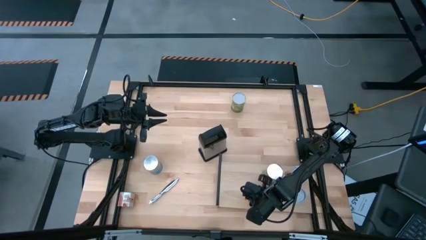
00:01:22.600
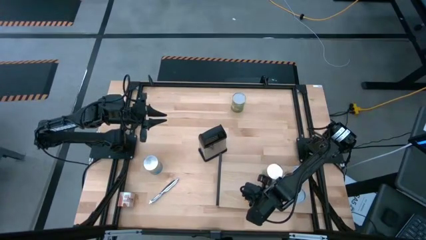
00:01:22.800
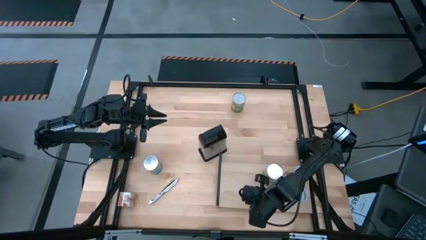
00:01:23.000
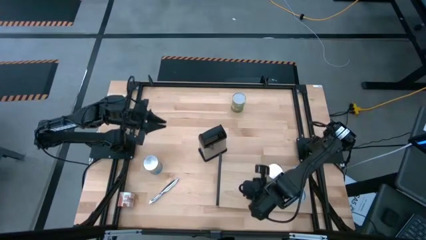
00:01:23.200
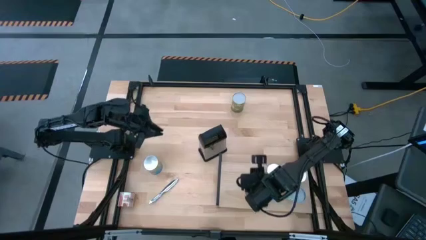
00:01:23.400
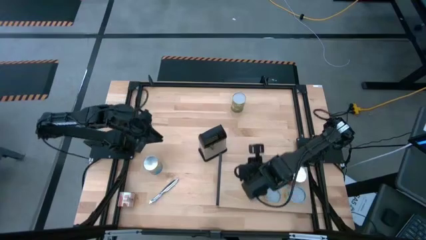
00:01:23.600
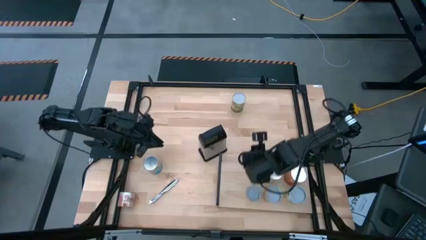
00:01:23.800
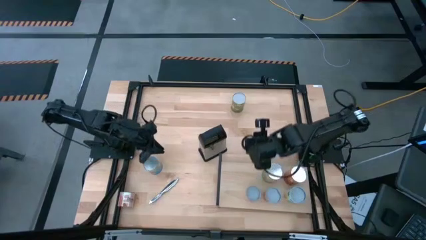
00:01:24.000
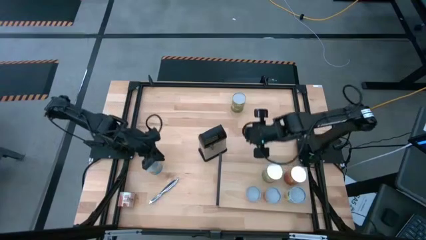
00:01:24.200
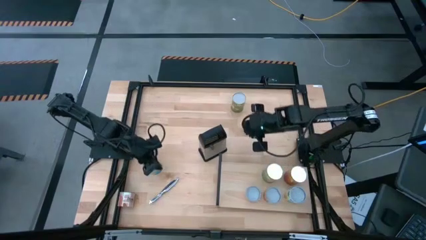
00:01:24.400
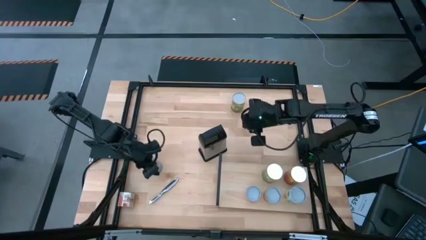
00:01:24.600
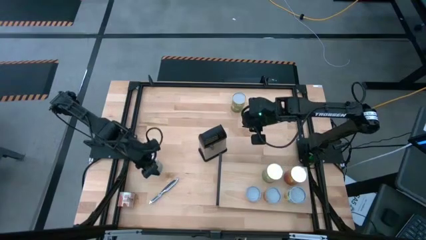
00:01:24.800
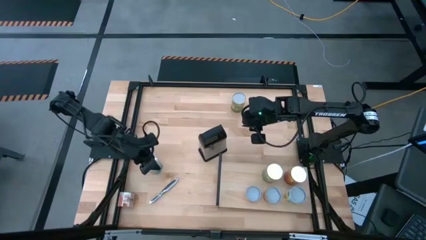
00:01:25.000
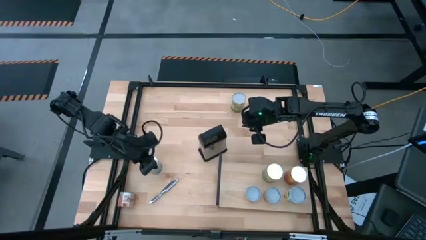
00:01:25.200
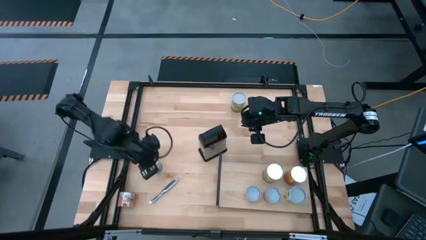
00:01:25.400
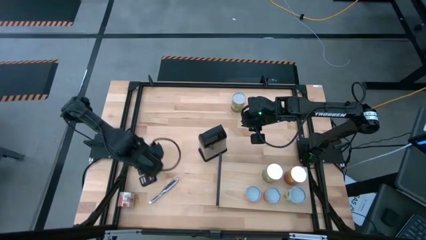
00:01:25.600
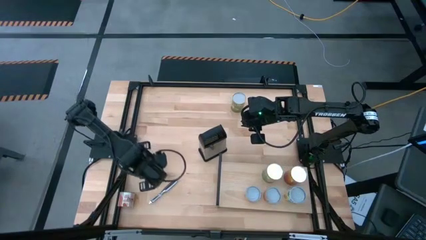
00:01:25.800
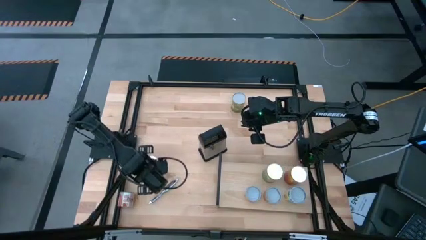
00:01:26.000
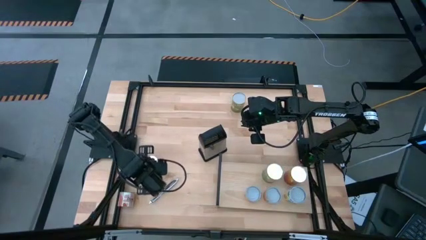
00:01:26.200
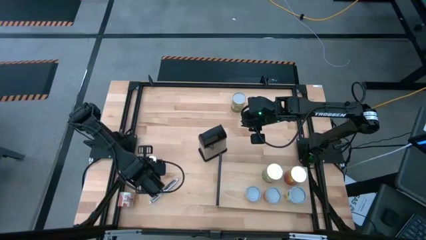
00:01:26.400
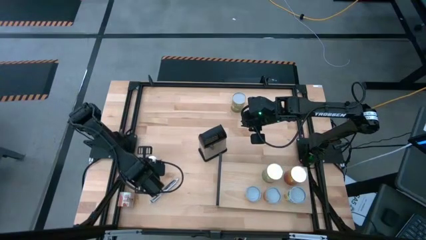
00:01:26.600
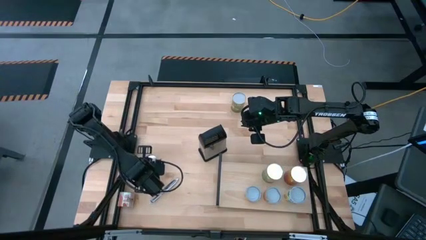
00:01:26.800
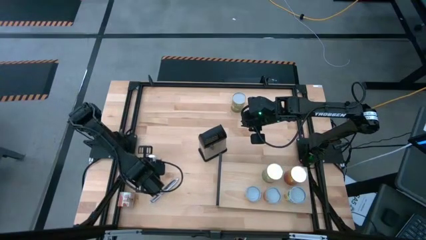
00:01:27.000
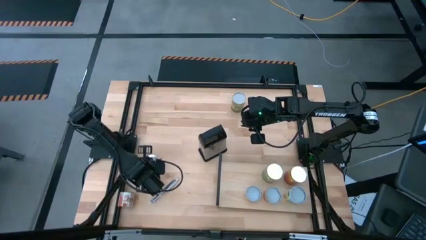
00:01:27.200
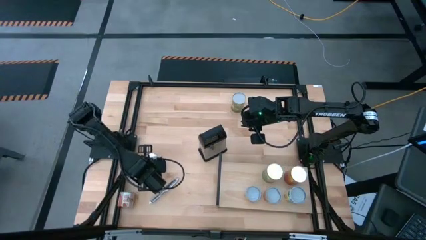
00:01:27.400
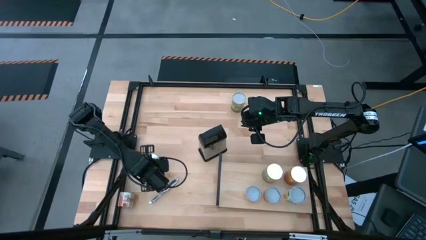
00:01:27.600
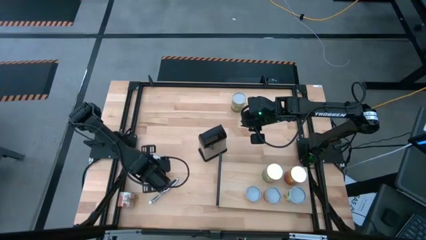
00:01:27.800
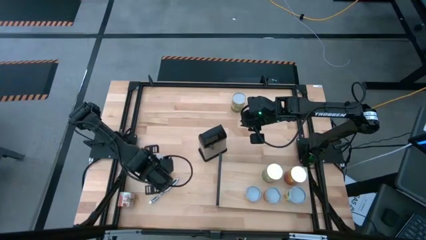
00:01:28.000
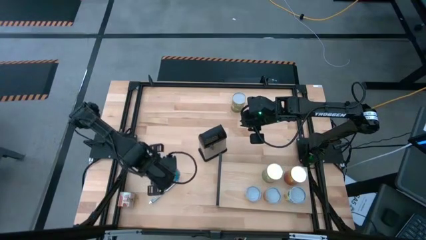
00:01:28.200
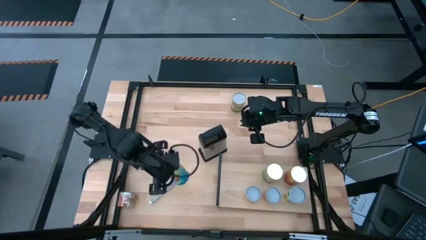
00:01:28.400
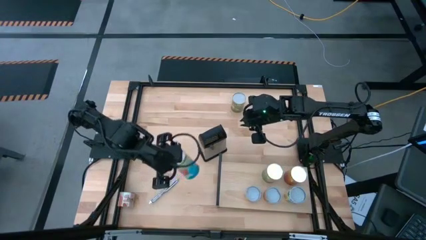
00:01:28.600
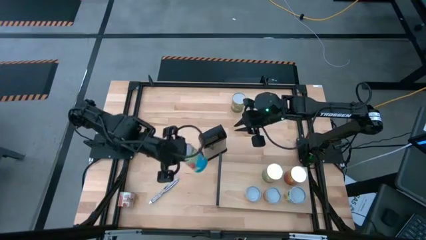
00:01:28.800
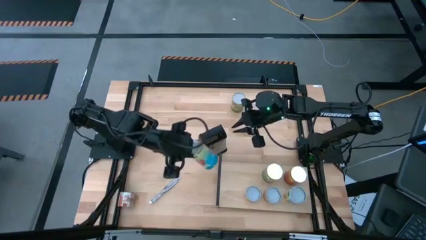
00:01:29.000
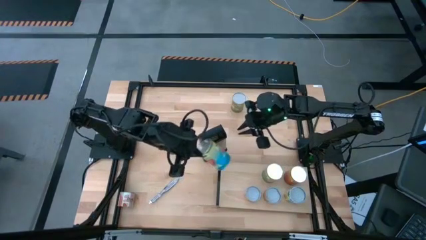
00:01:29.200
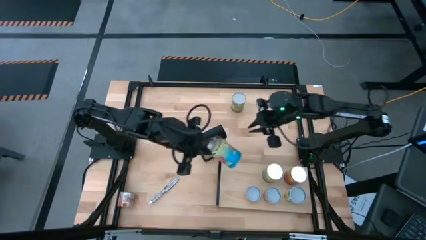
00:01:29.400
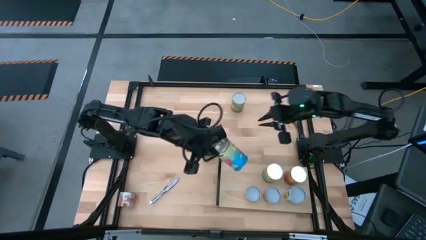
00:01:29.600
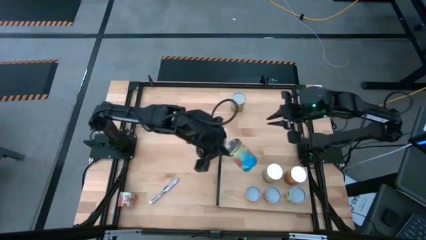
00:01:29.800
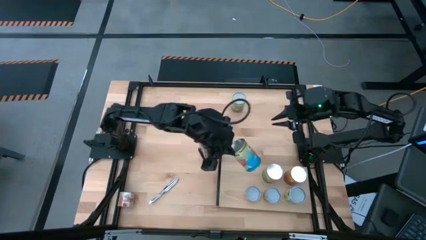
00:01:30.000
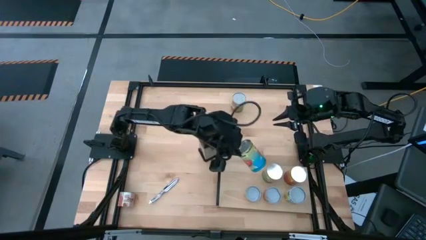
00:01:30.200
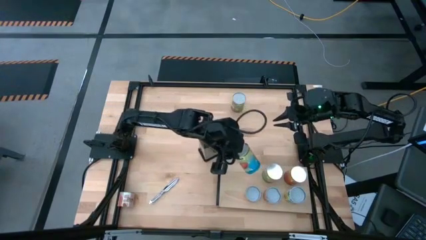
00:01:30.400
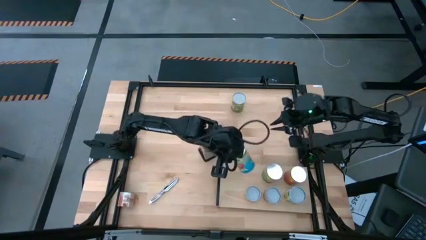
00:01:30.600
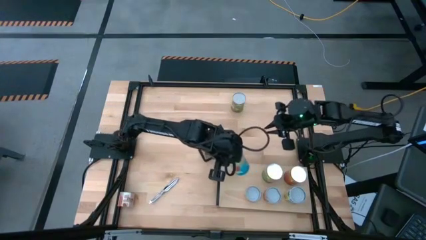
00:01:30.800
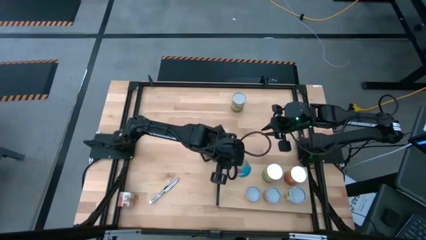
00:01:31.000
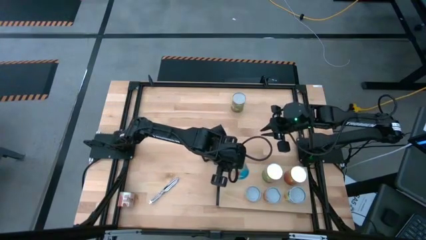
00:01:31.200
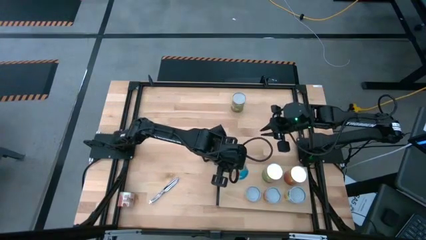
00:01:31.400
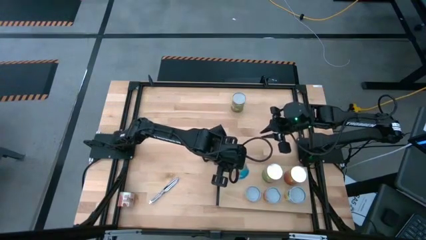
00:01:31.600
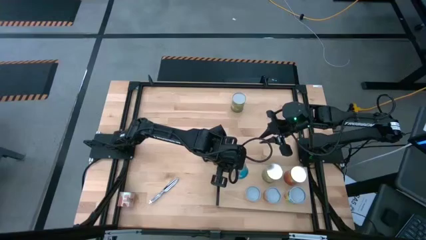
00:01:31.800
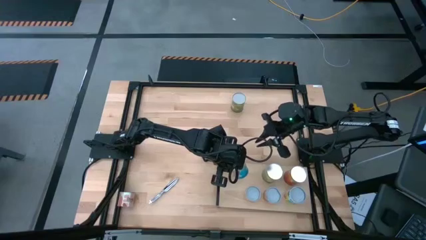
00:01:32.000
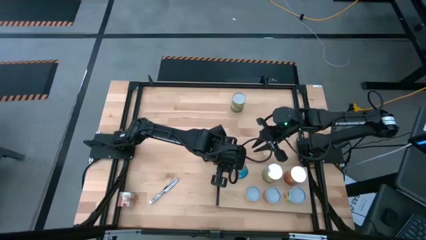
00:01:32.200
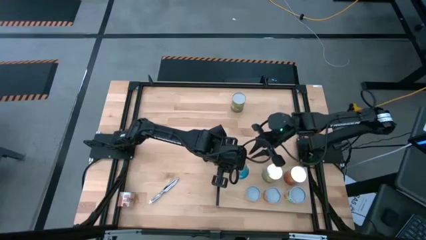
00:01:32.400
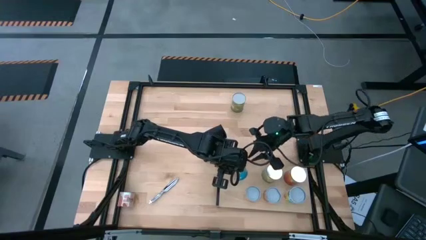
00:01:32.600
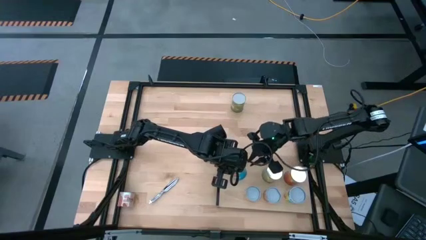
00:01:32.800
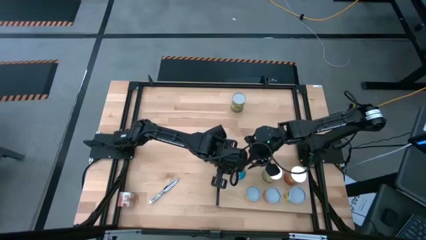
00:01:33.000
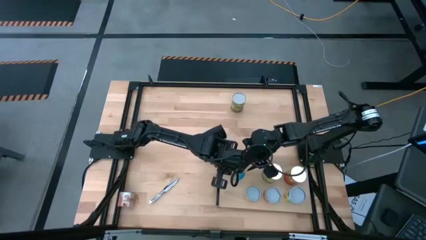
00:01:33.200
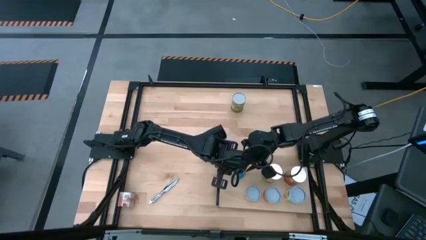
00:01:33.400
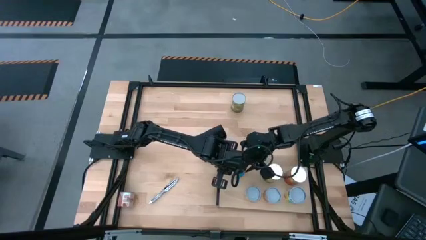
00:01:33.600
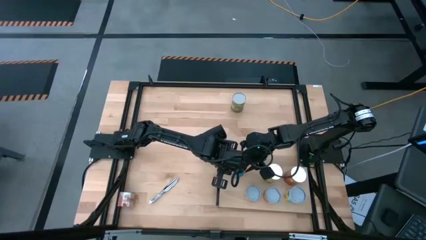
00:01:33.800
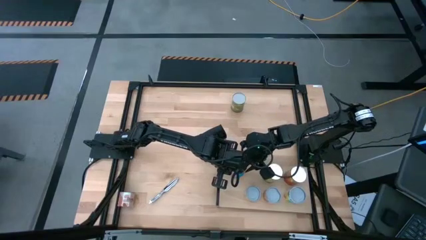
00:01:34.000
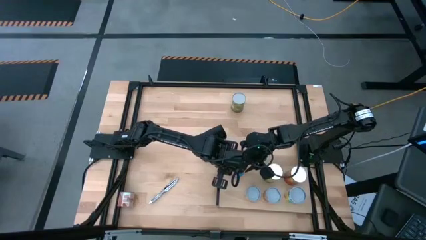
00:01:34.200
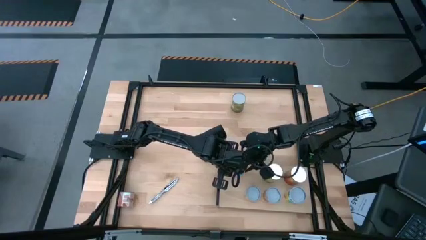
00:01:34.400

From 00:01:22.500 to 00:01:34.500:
Task: Pick and place cans onto a shelf
Put the canned tomatoes on the shelf

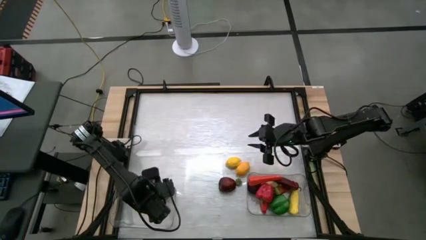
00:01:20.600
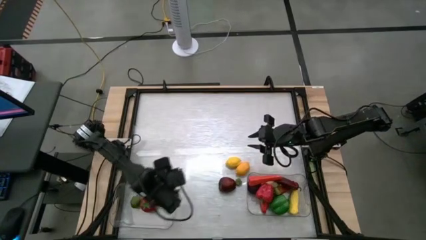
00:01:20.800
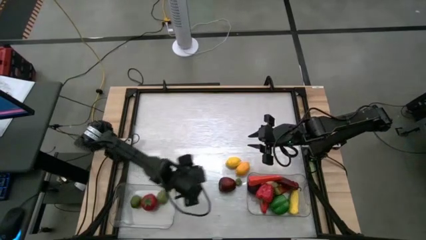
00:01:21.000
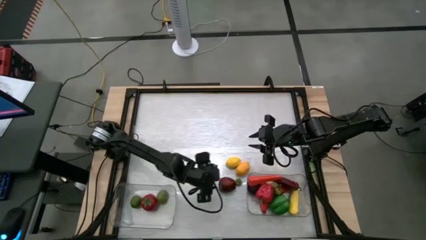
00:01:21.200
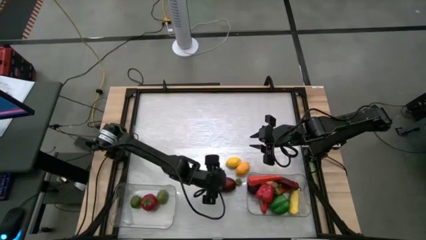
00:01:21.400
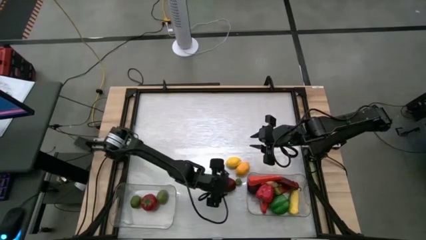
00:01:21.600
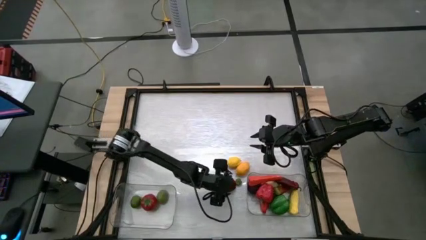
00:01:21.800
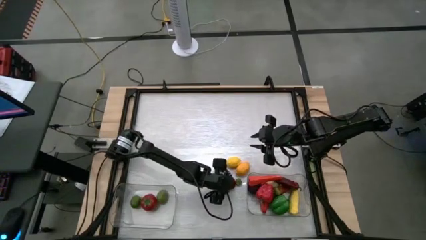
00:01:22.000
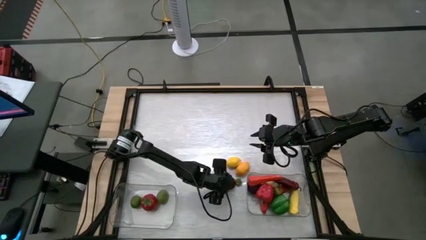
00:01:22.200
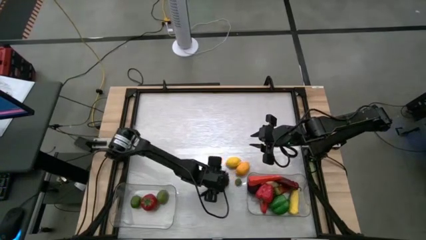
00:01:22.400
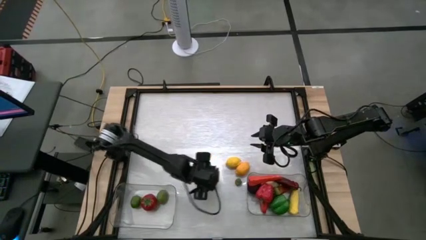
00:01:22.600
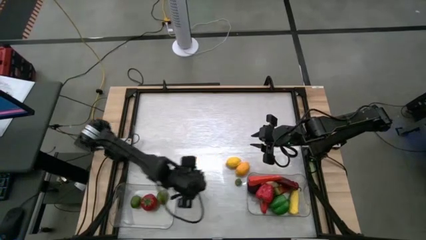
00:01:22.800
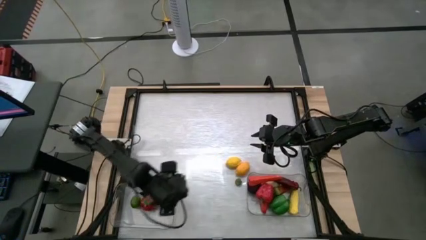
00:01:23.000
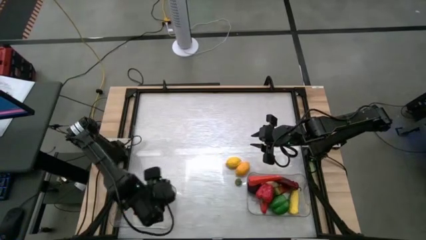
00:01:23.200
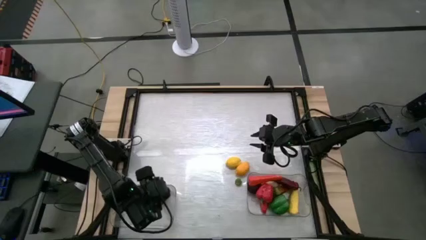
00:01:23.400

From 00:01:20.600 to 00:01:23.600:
Task: Sort produce into baskets
Put the apple into the left transparent bin

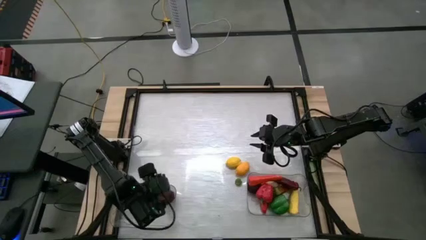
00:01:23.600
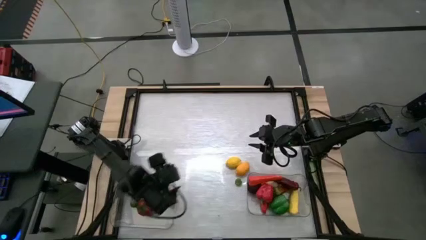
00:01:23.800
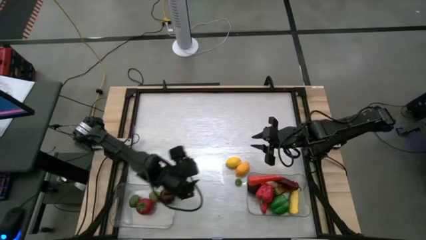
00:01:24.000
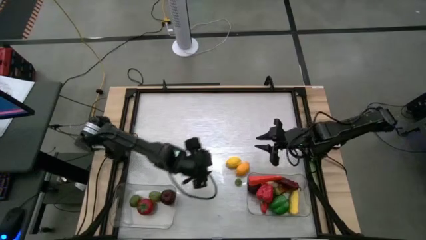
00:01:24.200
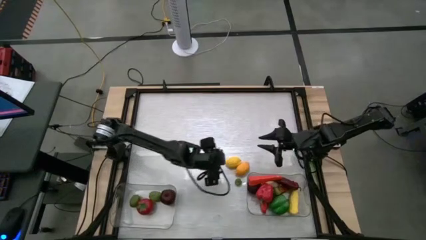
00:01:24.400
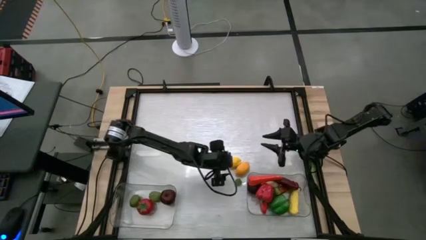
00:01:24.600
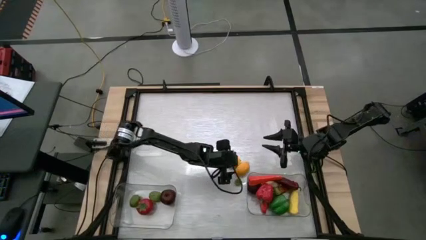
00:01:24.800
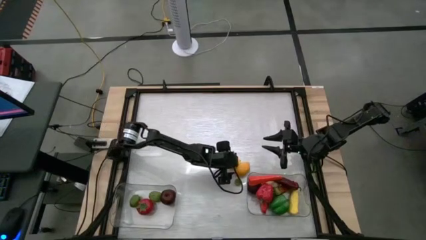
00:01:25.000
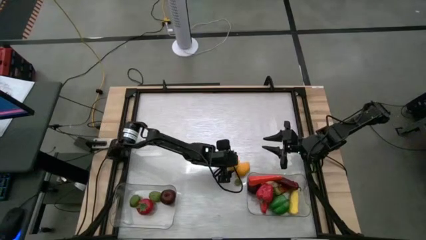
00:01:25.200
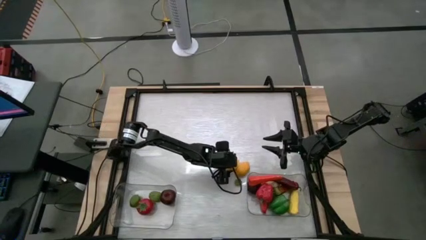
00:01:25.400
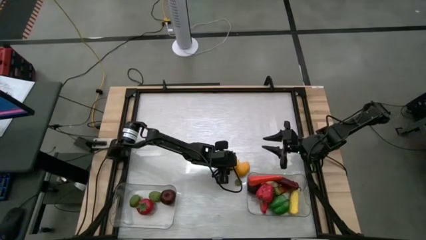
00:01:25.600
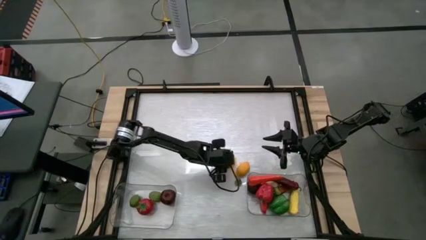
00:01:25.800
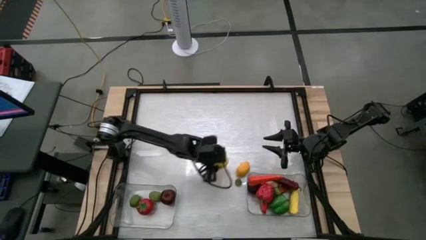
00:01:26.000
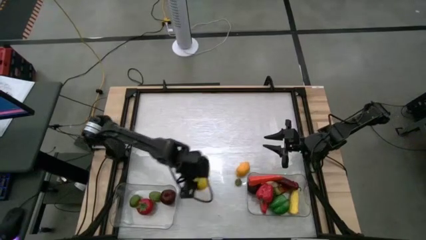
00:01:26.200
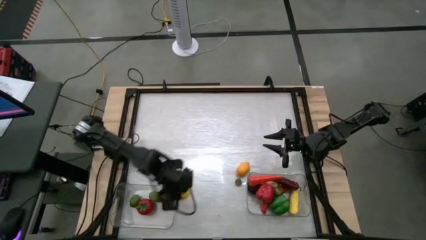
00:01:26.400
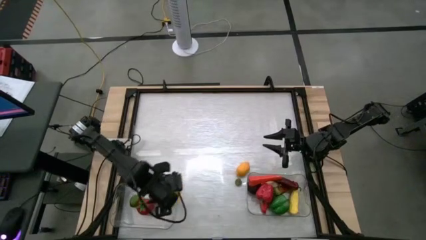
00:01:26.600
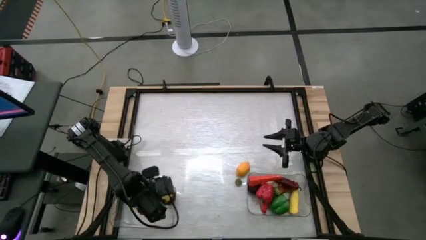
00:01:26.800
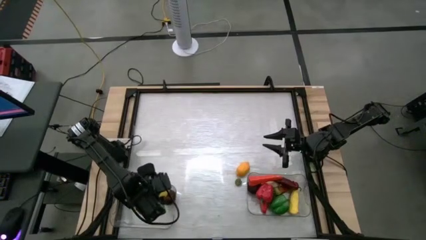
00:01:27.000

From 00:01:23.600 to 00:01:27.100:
Put the left lemon into the left transparent bin
